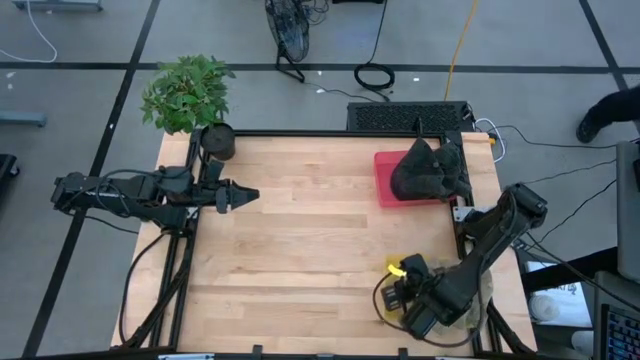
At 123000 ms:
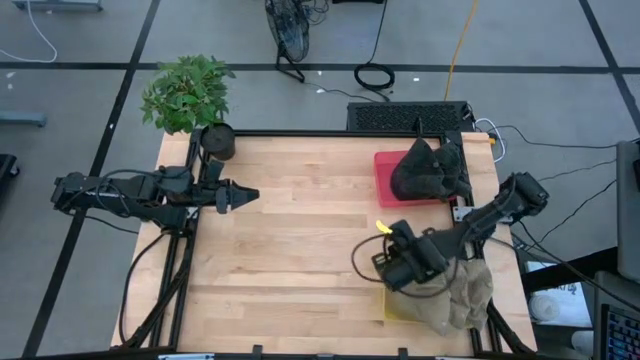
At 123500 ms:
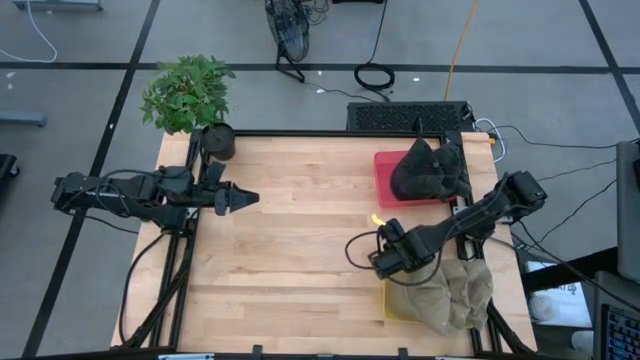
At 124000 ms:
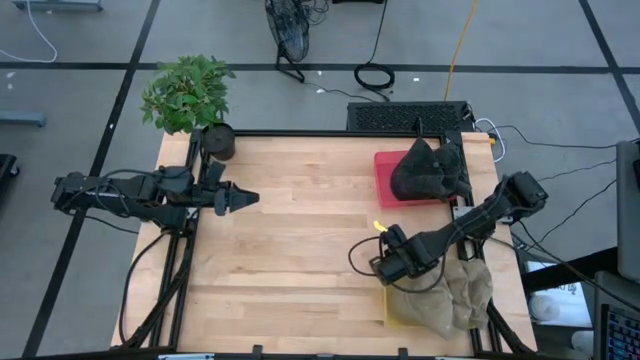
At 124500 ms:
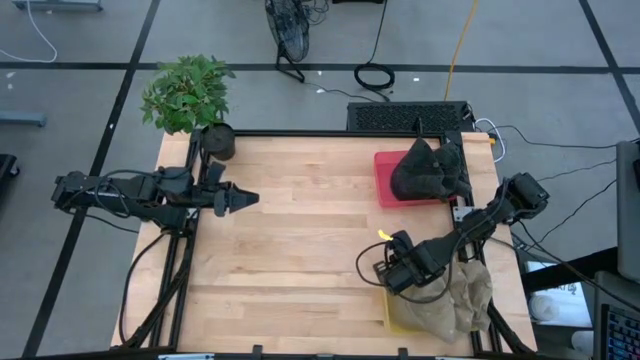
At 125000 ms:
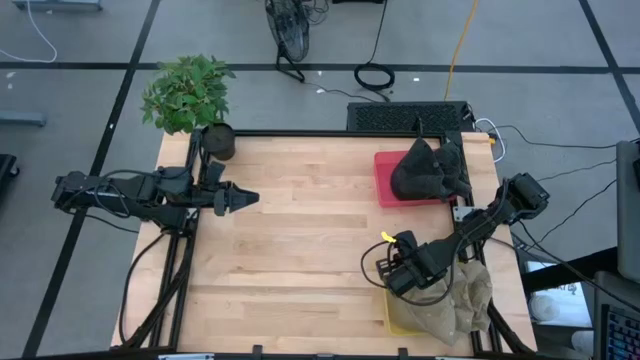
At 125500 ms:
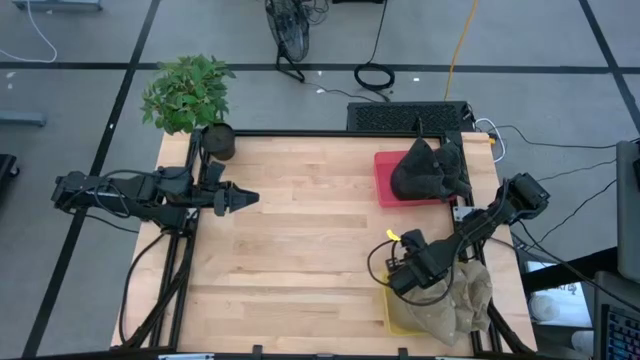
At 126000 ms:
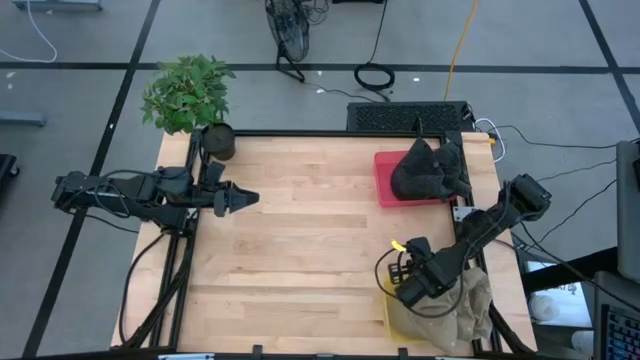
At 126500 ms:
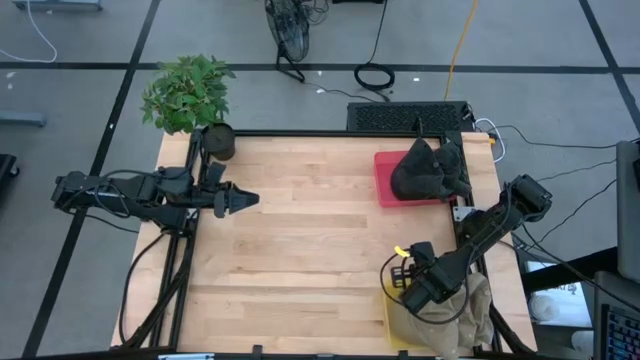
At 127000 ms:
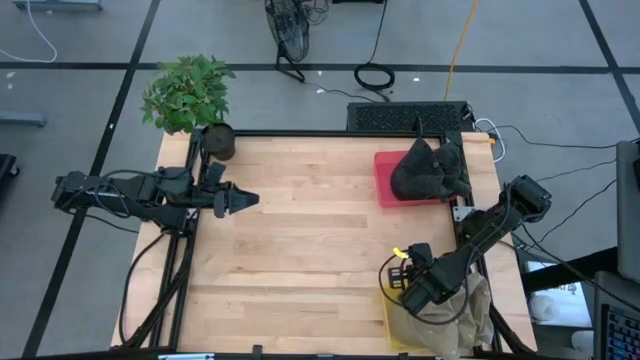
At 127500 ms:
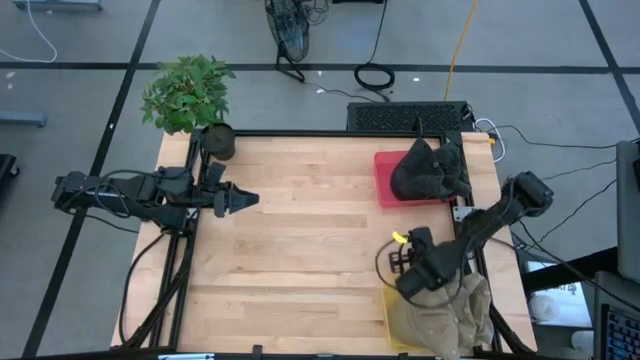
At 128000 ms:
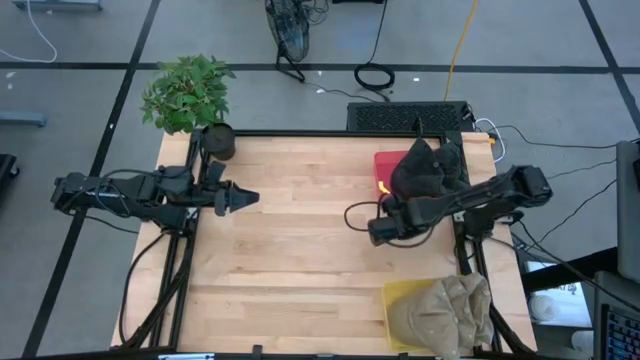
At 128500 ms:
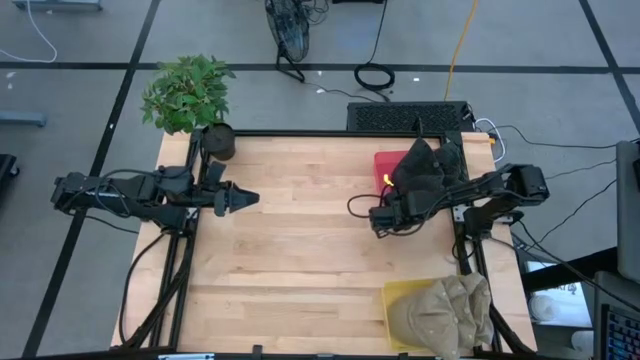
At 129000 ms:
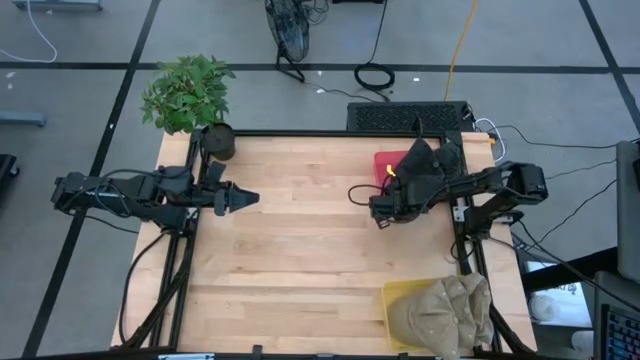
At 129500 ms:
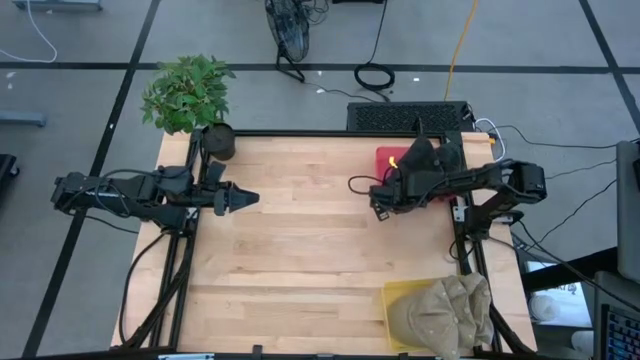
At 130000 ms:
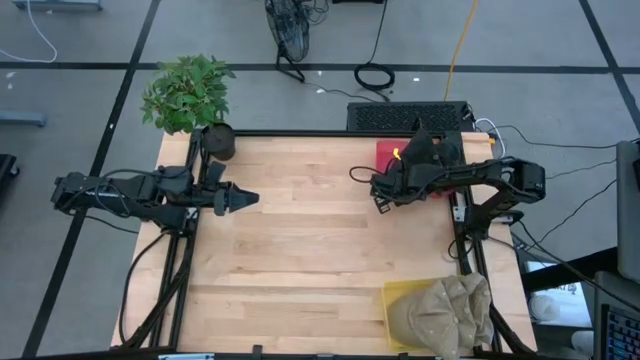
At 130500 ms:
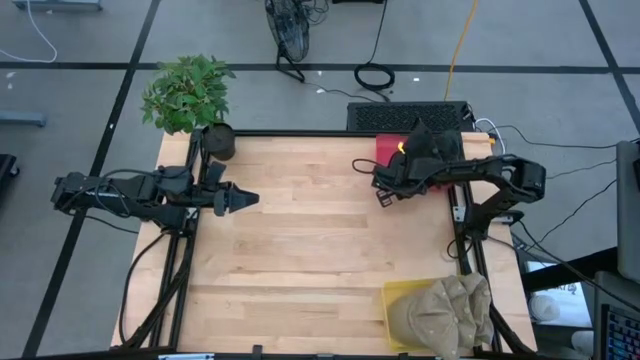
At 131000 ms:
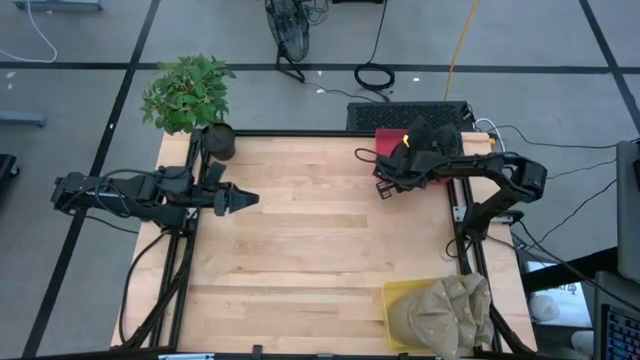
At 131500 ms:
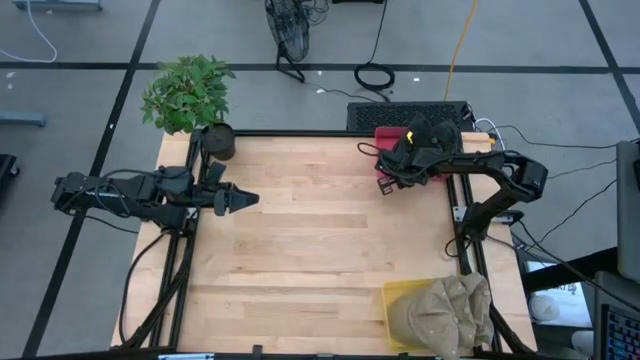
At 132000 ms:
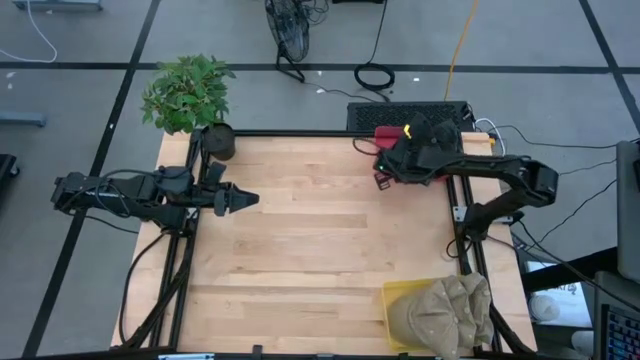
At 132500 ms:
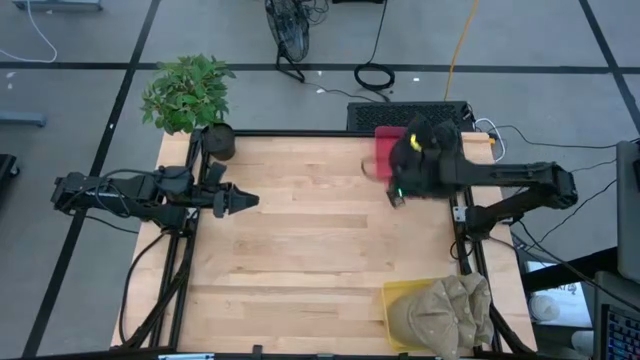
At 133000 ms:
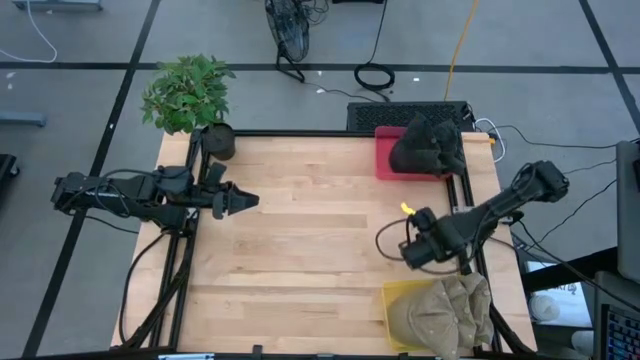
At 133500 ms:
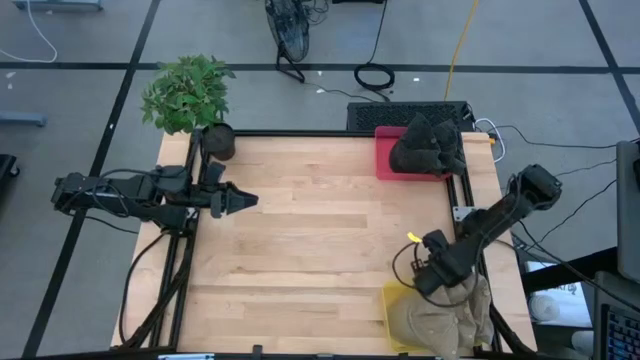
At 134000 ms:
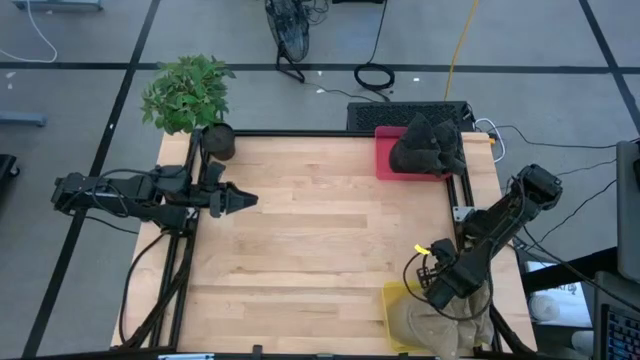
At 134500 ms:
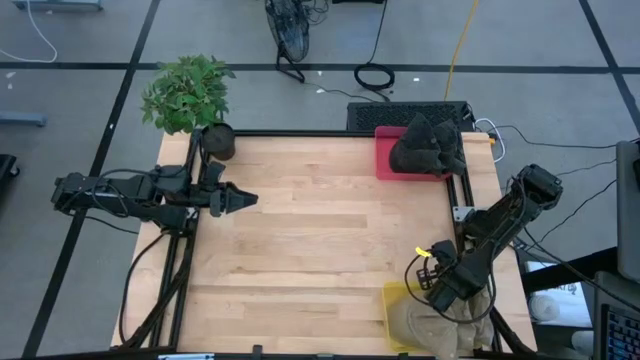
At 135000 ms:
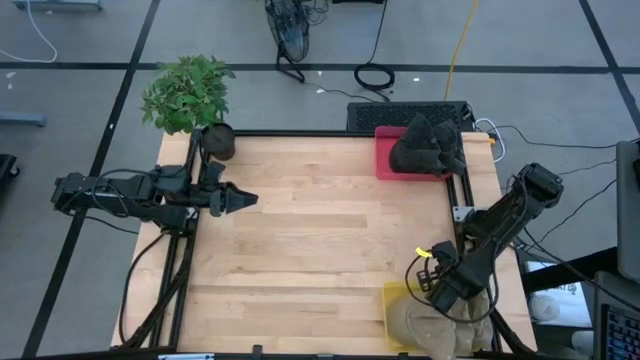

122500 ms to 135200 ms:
Task: Pick & Place hat
Adjust the bins

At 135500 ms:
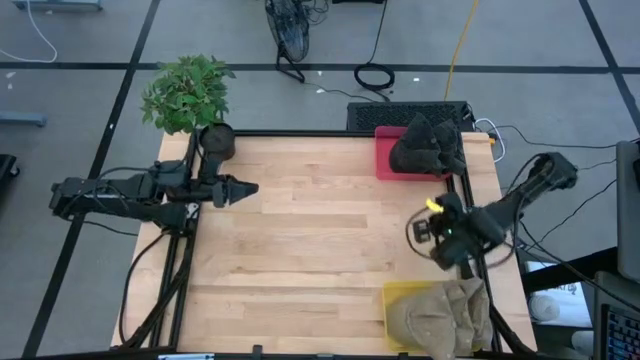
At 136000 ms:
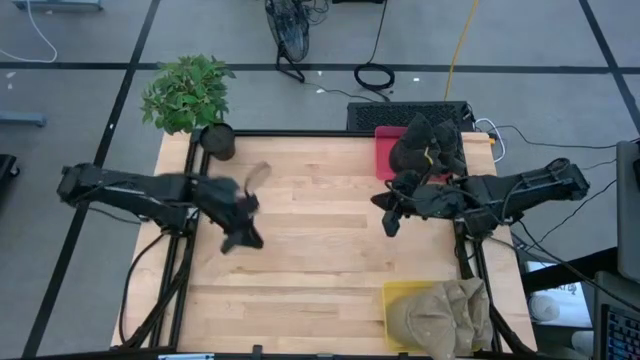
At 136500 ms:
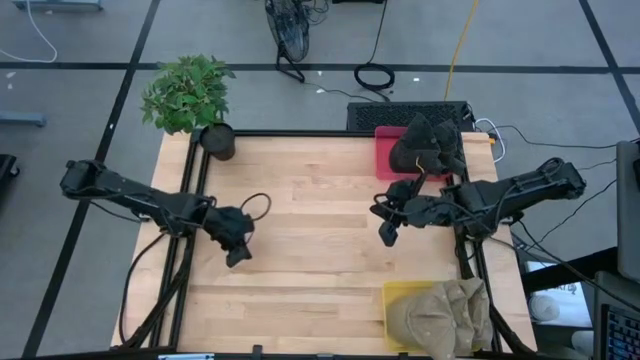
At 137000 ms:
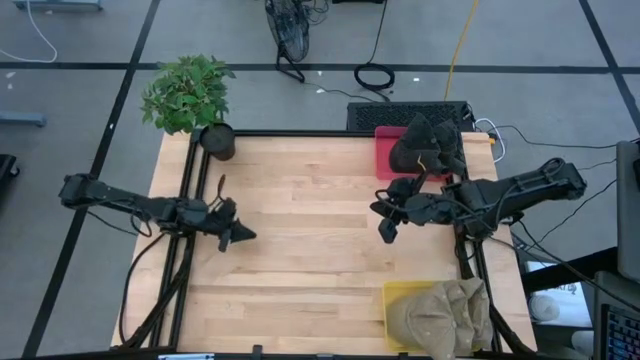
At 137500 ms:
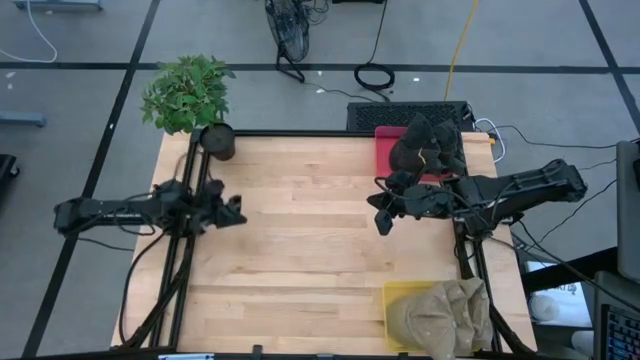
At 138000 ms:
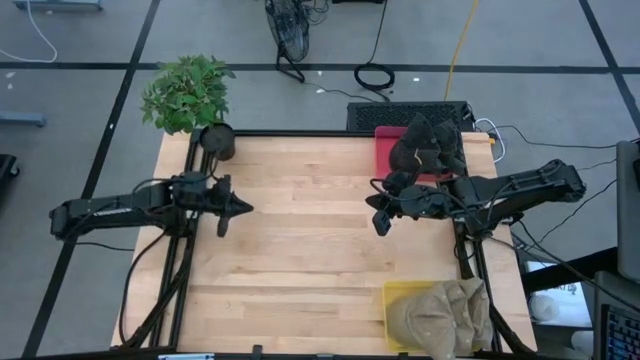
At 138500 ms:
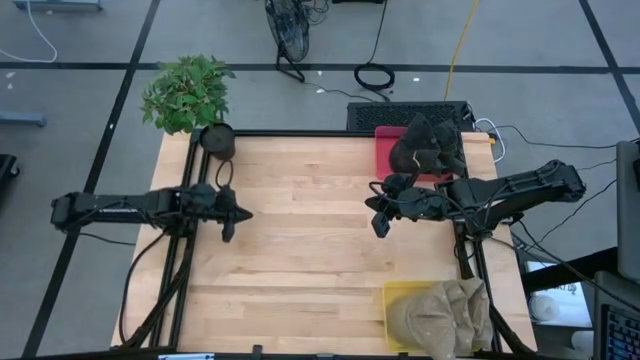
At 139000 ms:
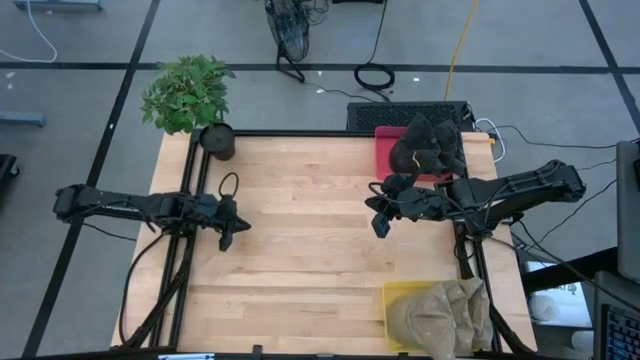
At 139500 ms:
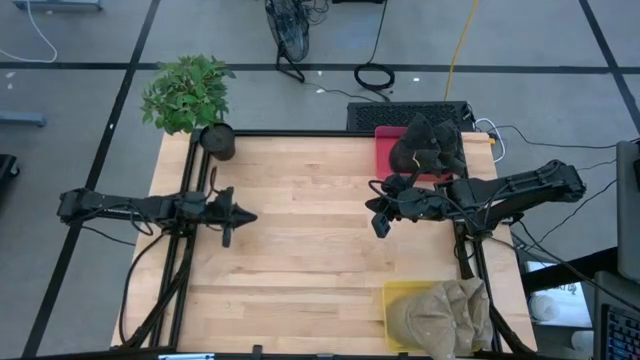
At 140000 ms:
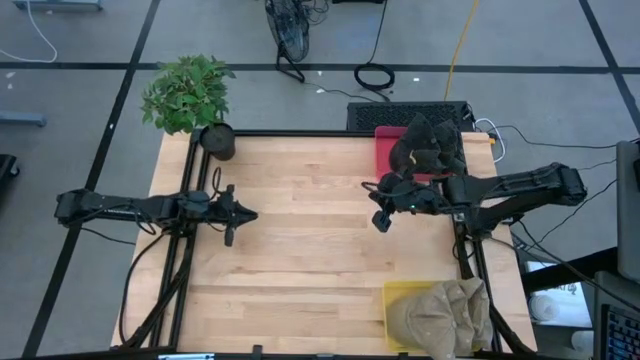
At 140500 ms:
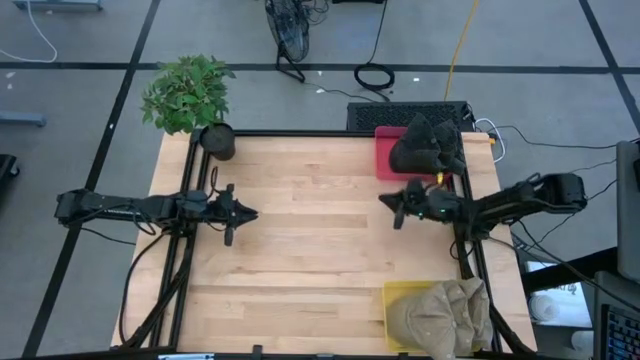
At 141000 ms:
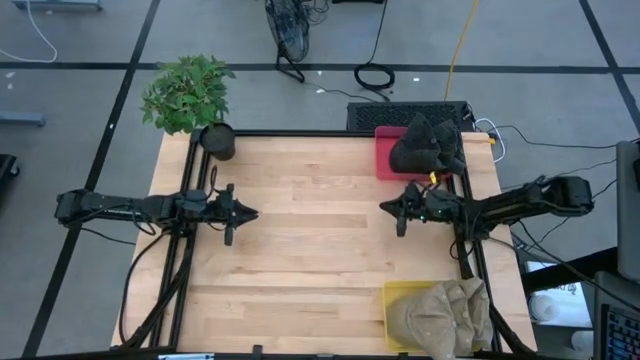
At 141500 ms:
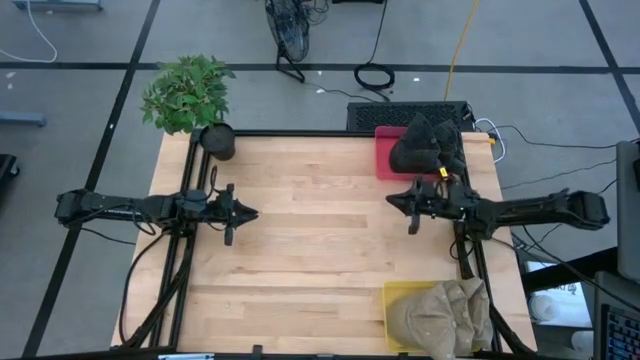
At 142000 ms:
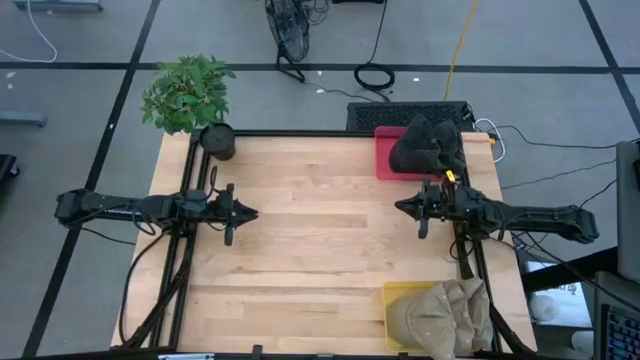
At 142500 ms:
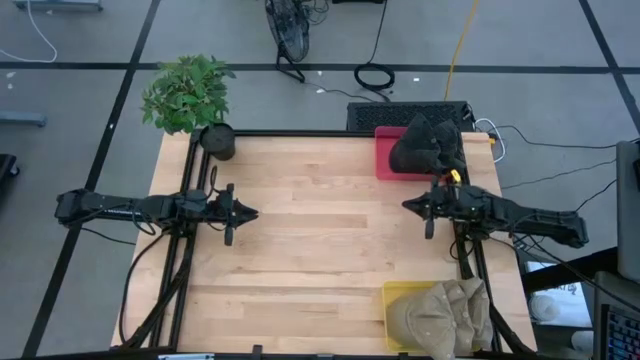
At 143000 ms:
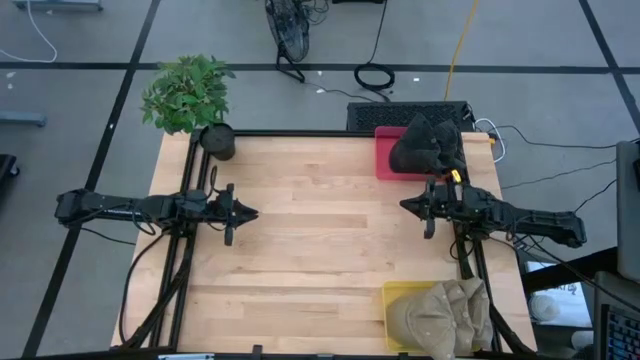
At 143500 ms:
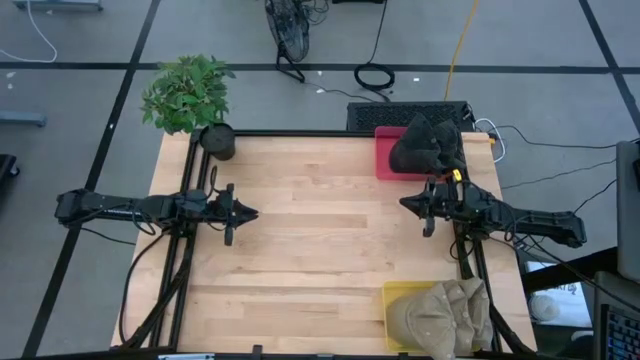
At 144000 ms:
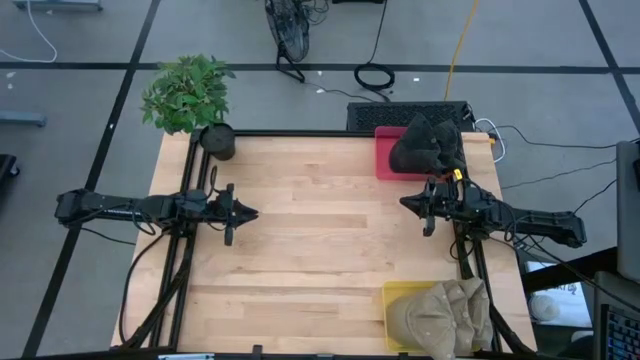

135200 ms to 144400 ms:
Return to Home Position
